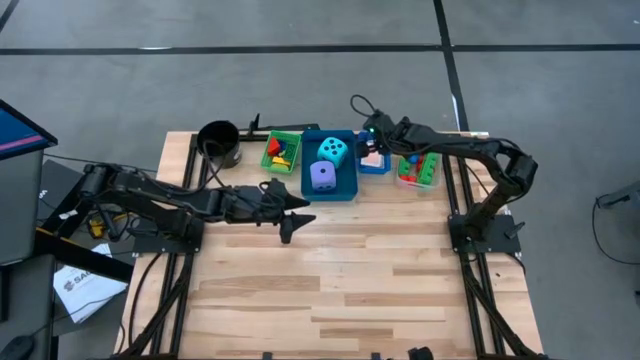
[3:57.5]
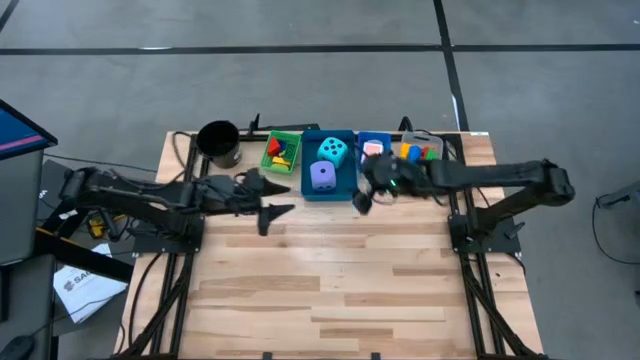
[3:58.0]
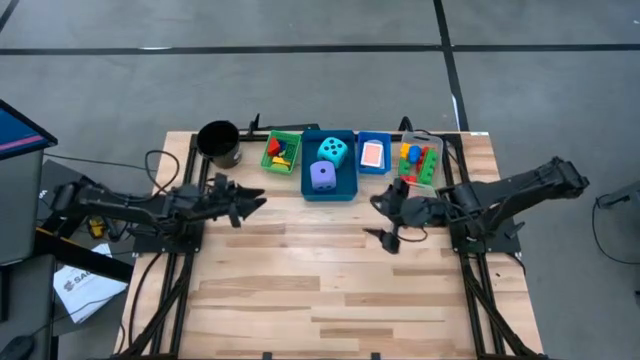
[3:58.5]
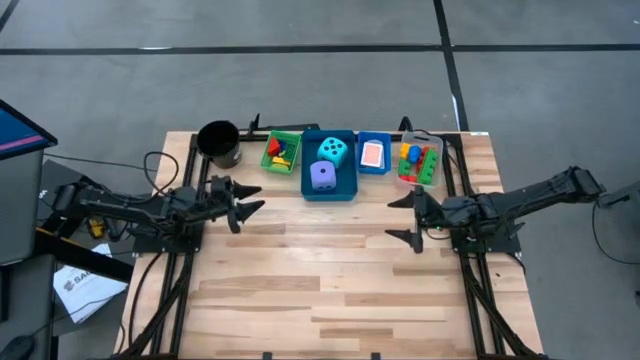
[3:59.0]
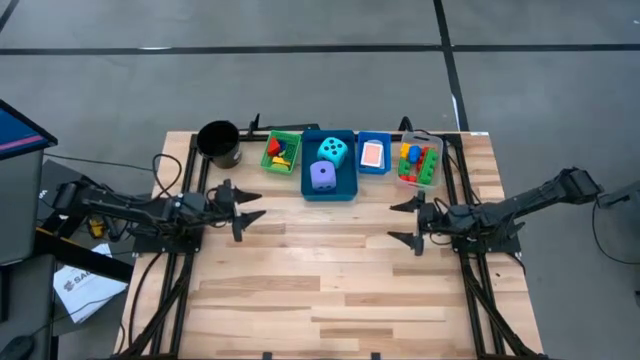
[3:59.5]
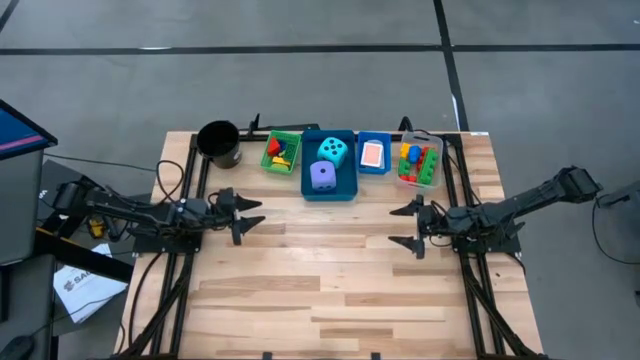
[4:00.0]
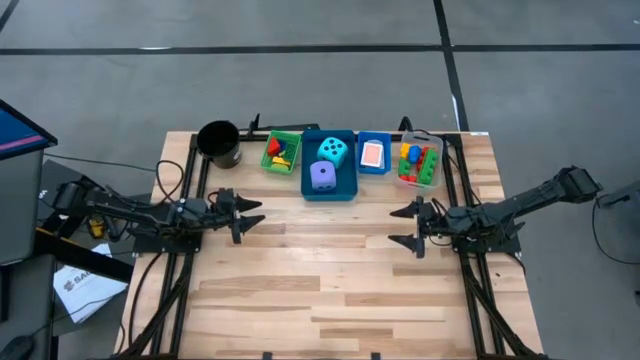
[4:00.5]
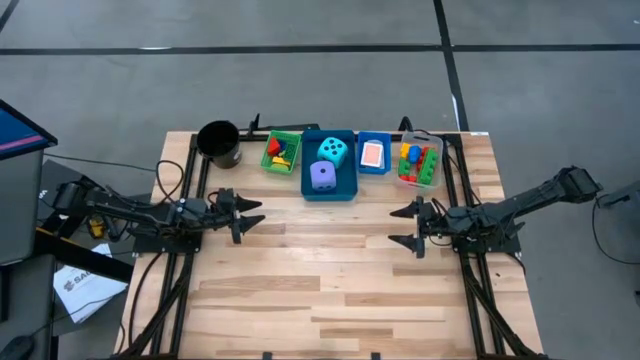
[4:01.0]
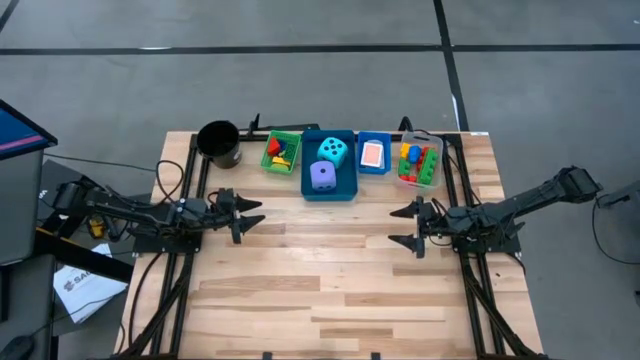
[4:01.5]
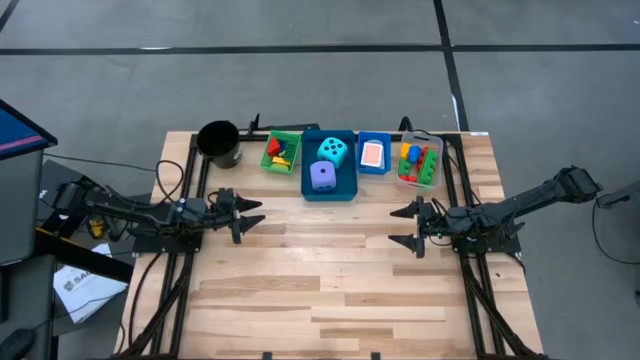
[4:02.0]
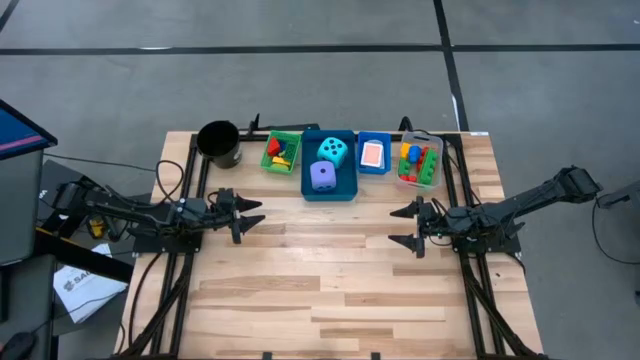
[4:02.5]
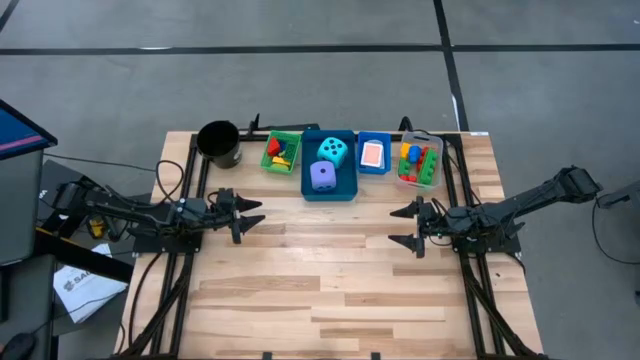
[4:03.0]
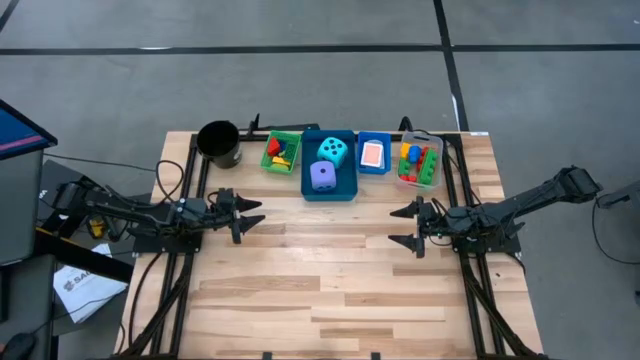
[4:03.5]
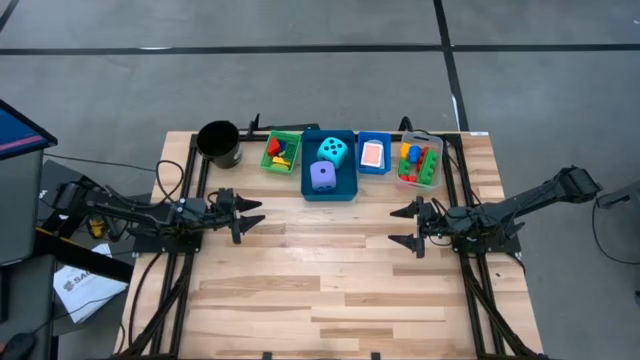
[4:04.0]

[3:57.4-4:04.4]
Task: Pick & Place Toys
Return to Home Position

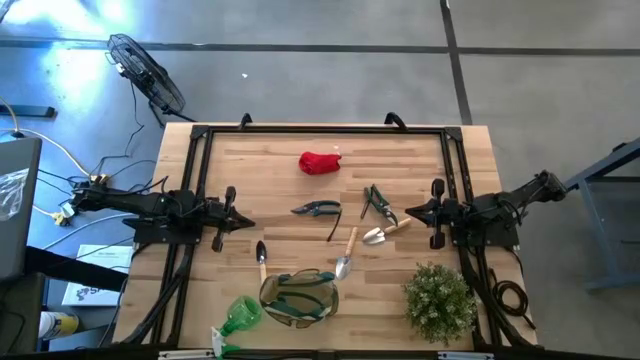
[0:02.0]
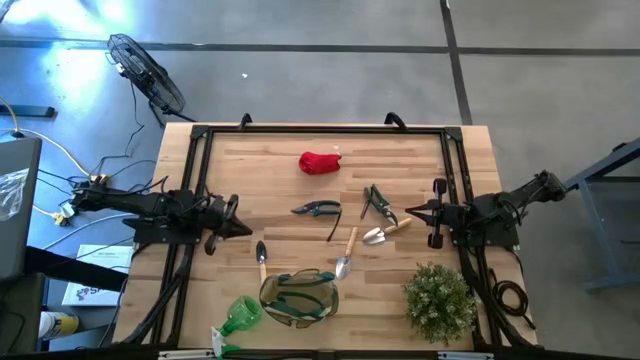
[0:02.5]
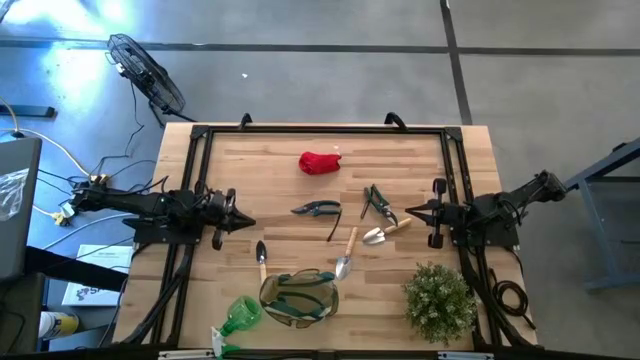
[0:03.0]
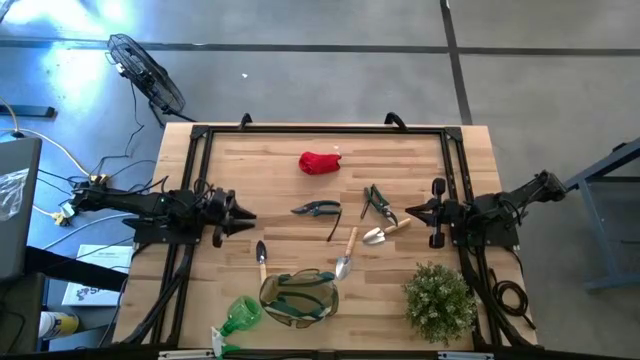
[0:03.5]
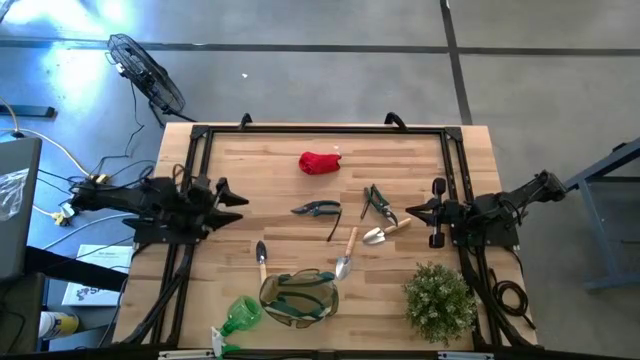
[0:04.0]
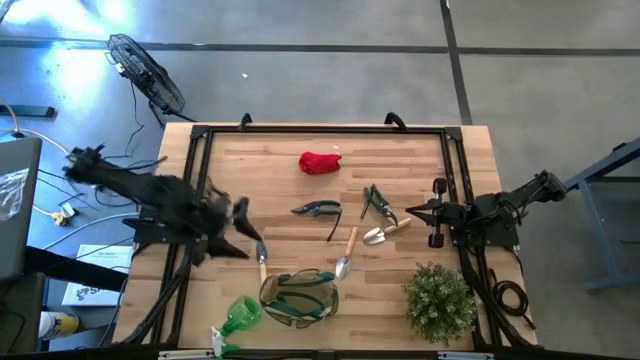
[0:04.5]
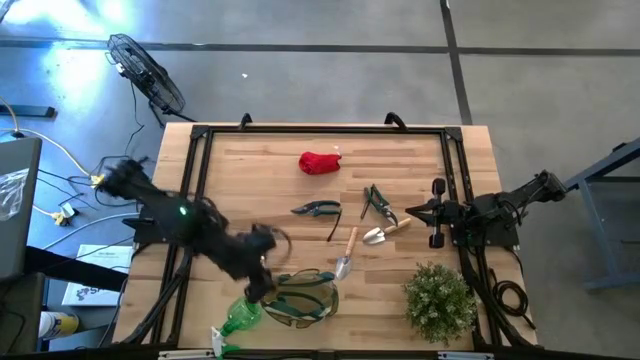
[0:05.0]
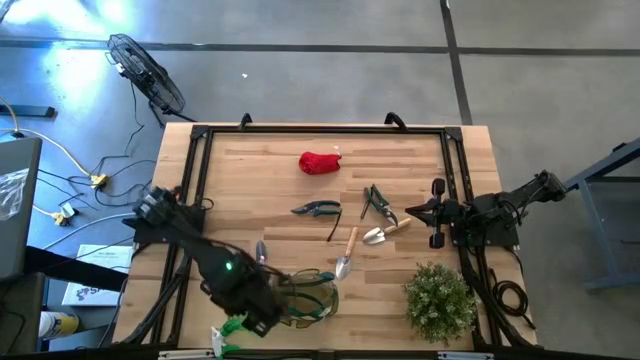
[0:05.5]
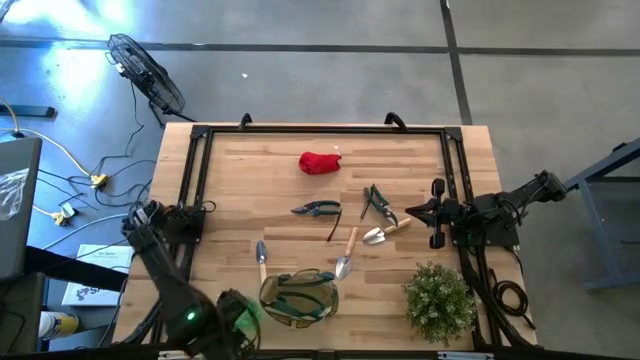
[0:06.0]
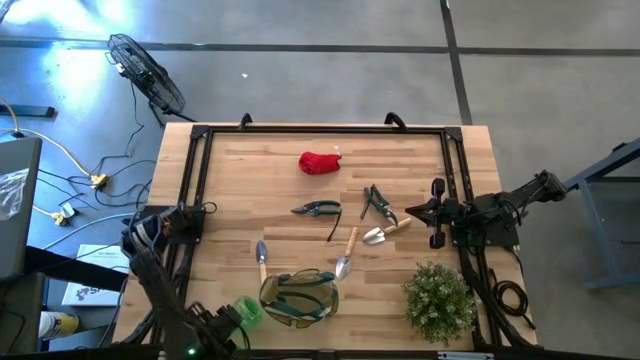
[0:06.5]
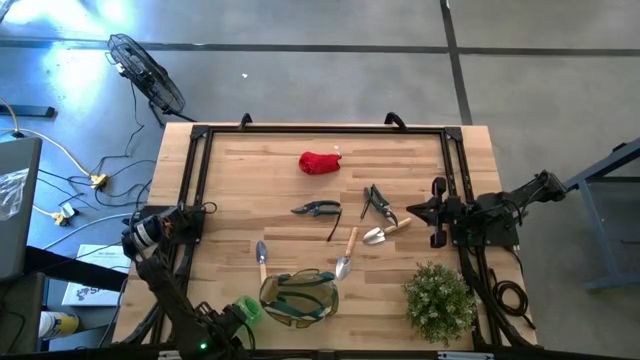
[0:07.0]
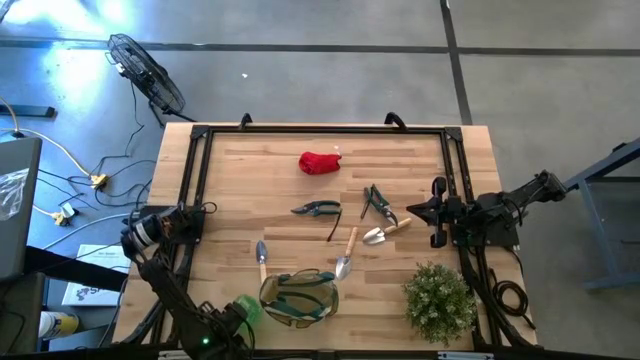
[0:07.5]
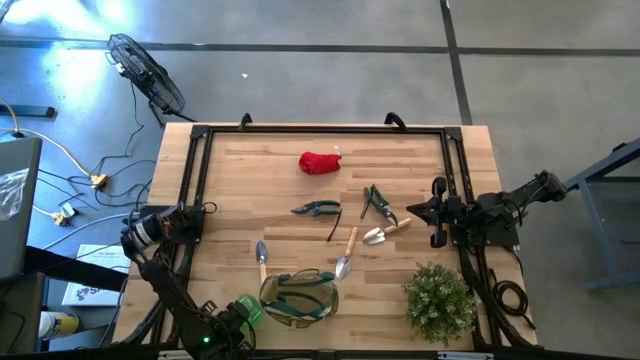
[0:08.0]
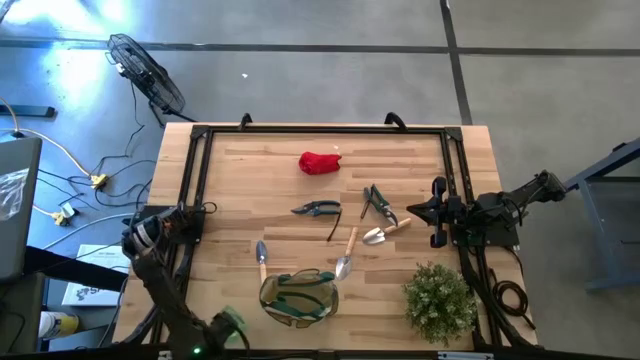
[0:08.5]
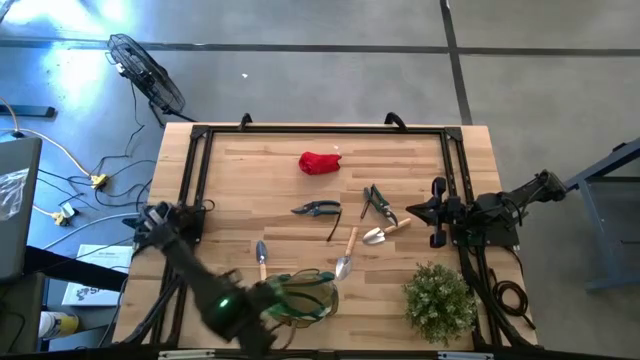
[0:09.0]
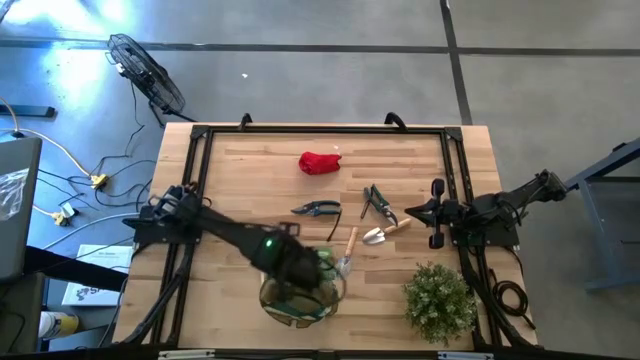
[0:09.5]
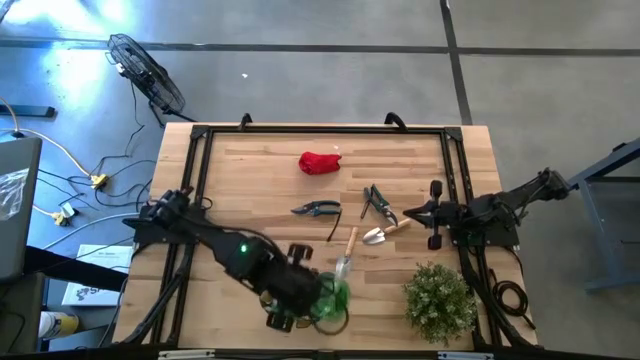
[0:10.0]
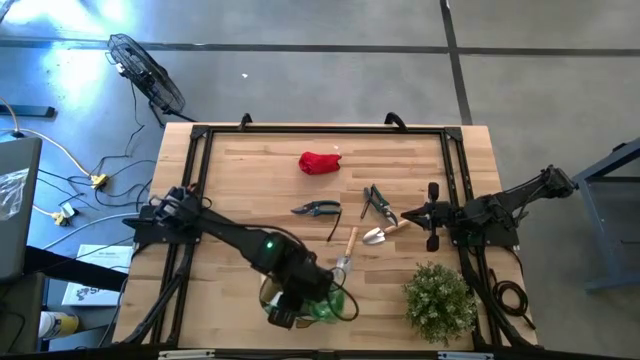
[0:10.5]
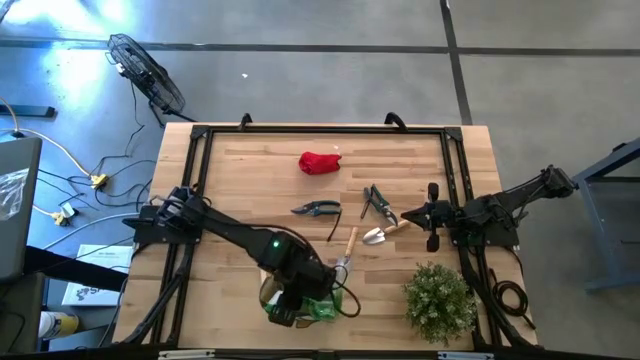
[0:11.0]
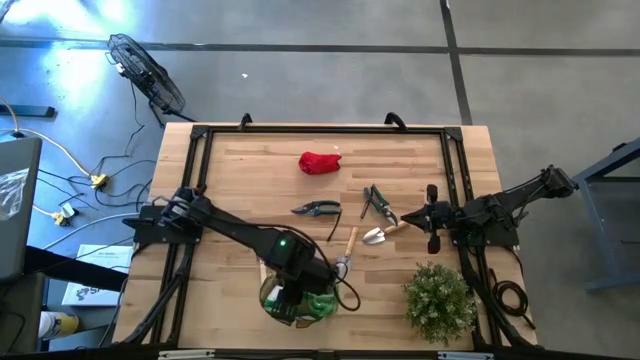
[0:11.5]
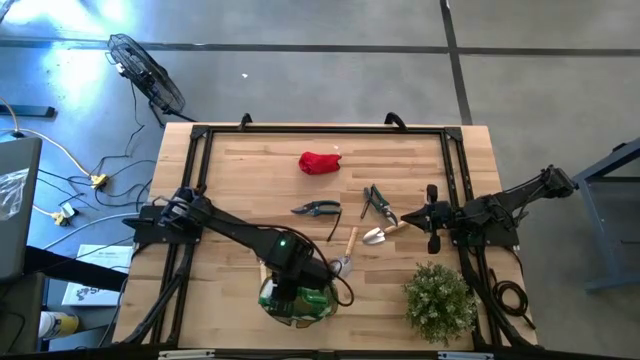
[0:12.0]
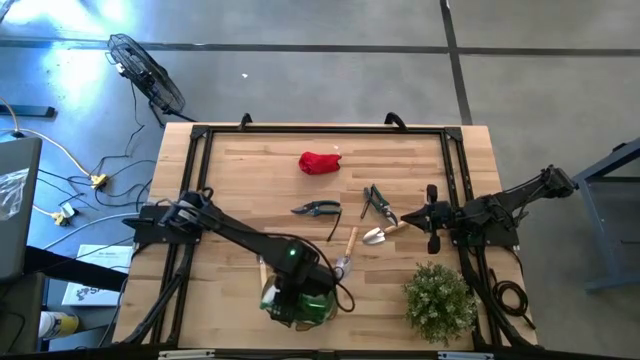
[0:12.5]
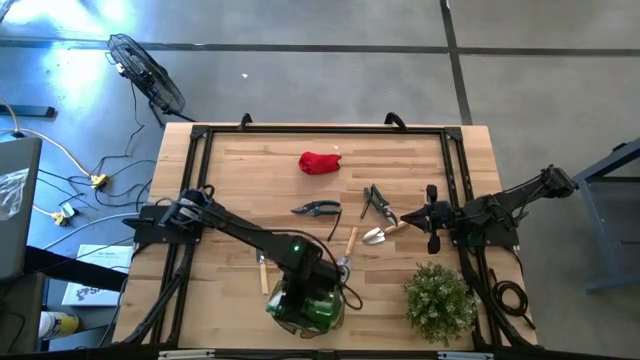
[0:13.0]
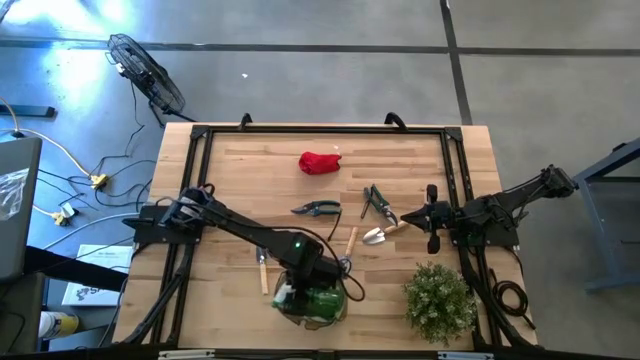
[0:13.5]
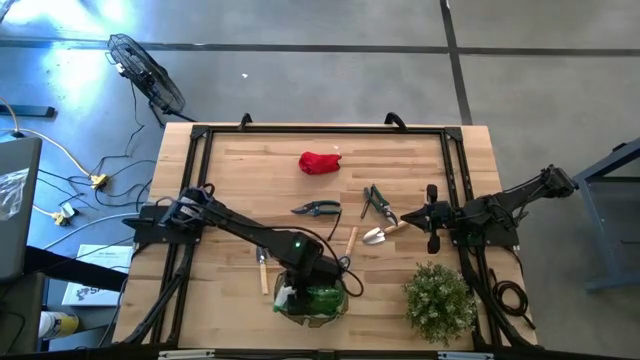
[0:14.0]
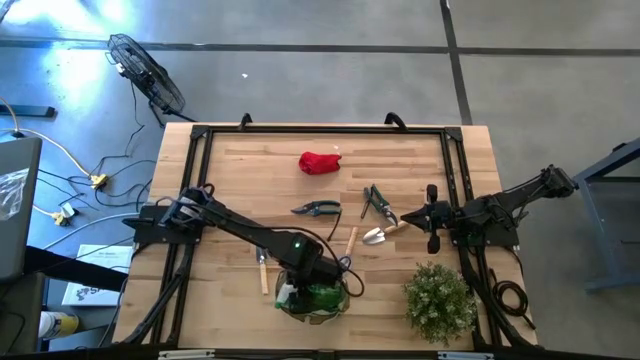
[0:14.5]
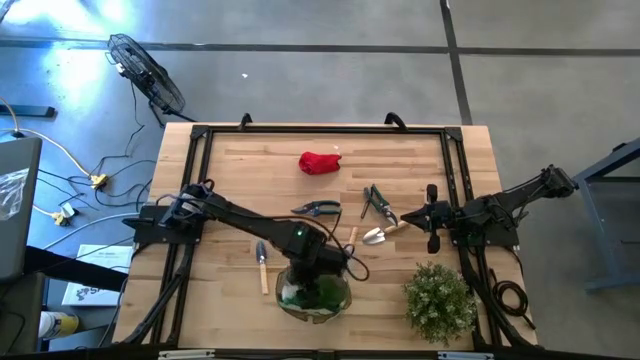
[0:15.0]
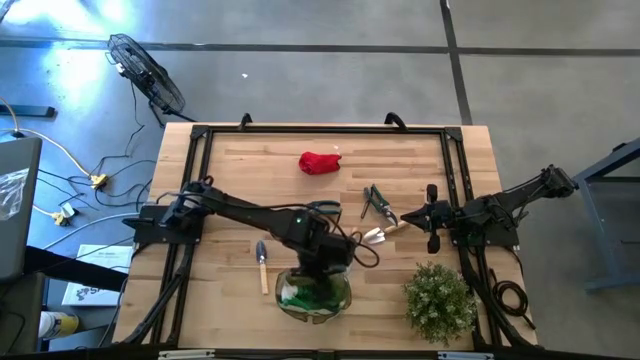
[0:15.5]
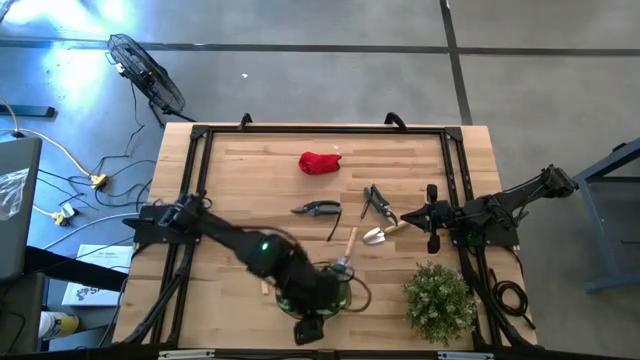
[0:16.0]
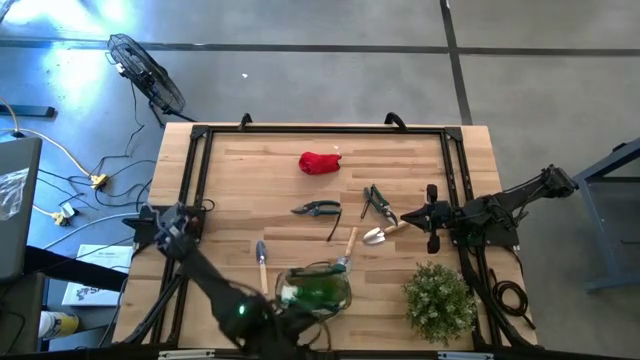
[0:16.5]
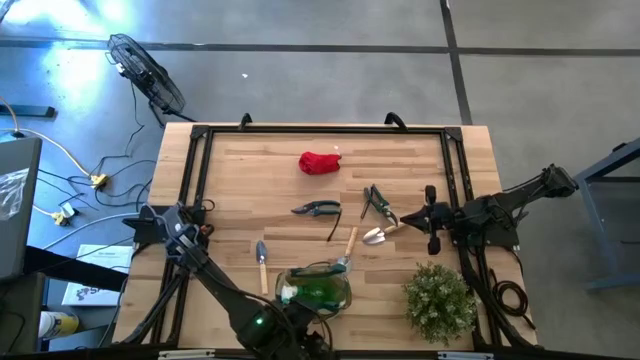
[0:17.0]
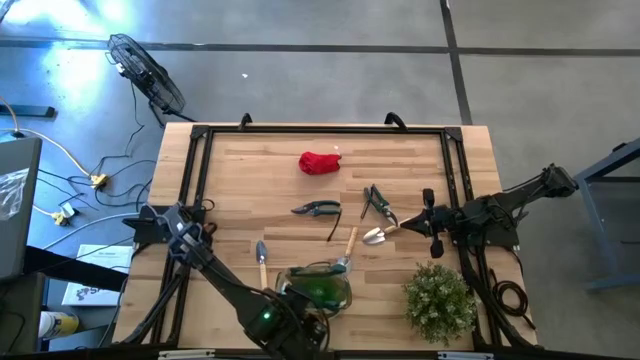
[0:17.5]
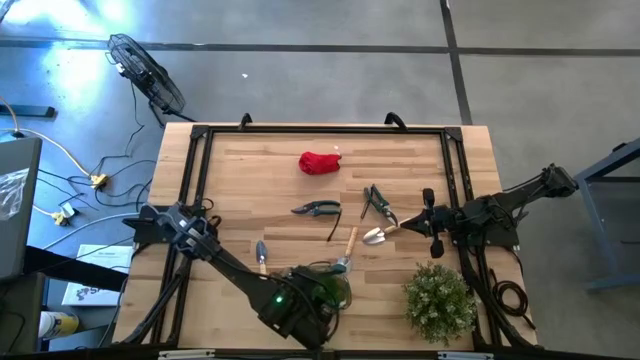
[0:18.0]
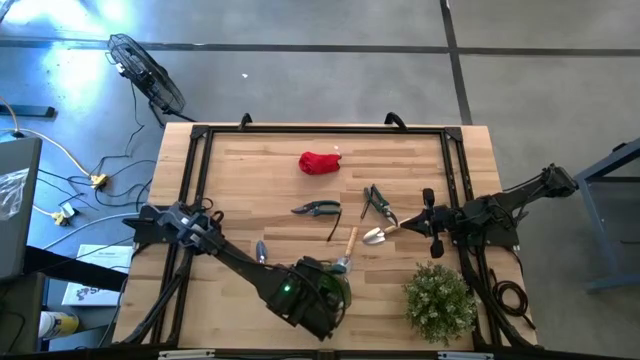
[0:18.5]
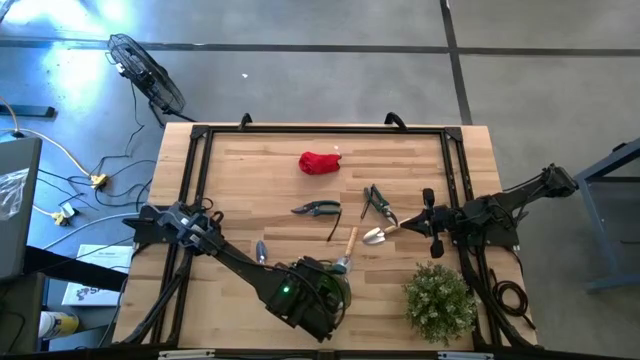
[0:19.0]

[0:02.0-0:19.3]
Task: Pick & Place Garden tools in Gardening bag
Put the green spray bottle into the green gardening bag
